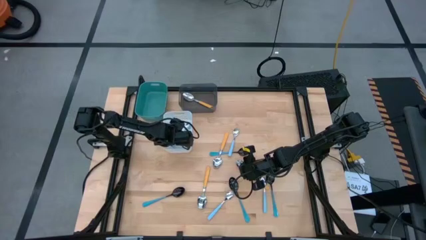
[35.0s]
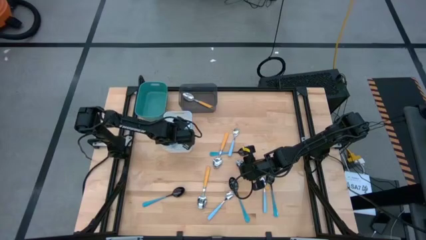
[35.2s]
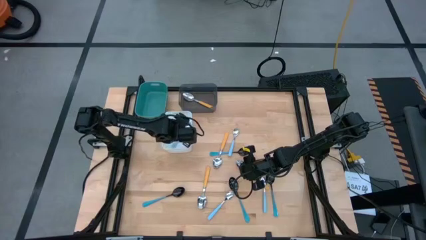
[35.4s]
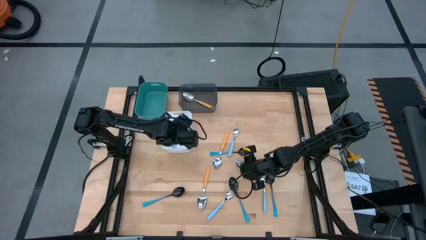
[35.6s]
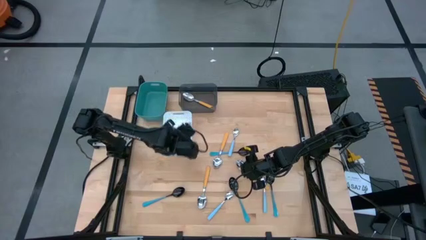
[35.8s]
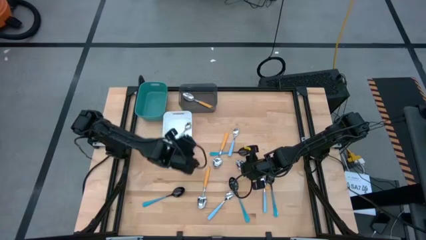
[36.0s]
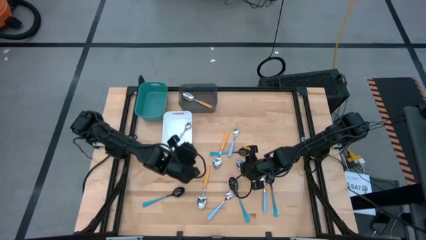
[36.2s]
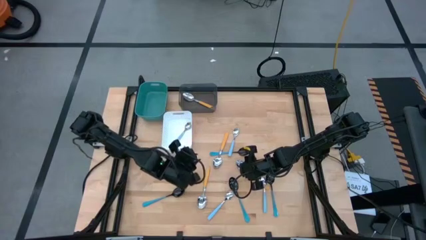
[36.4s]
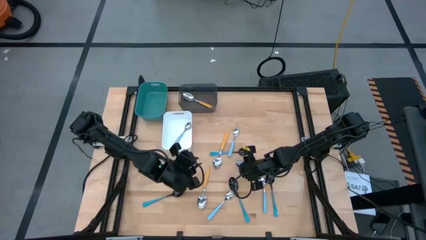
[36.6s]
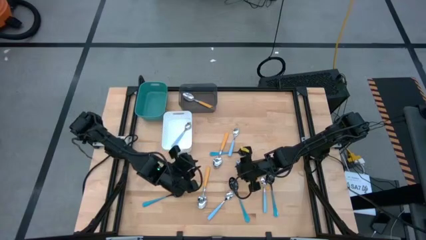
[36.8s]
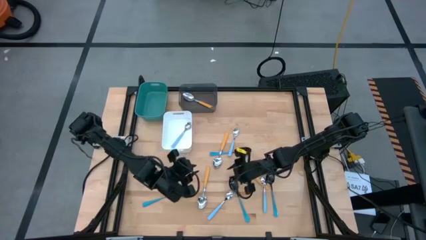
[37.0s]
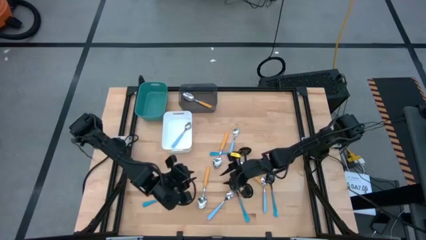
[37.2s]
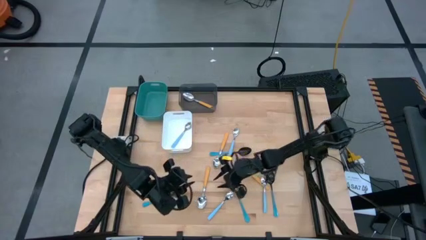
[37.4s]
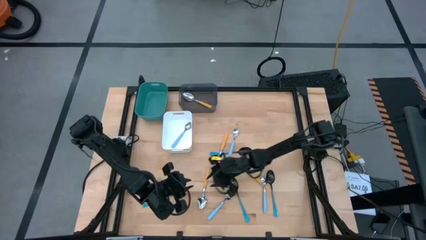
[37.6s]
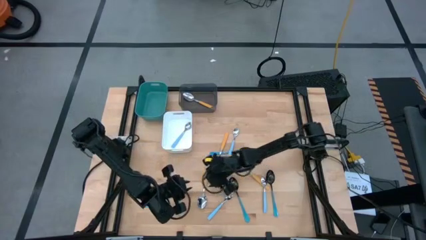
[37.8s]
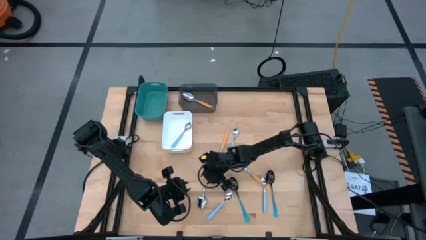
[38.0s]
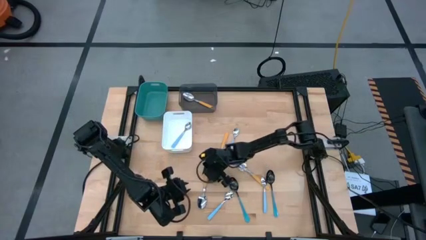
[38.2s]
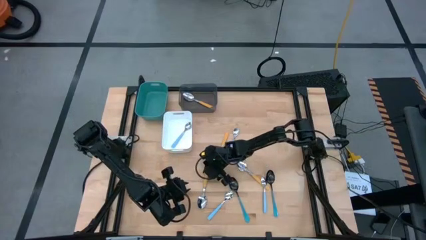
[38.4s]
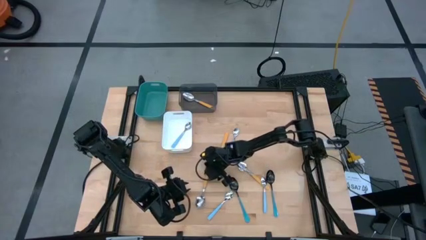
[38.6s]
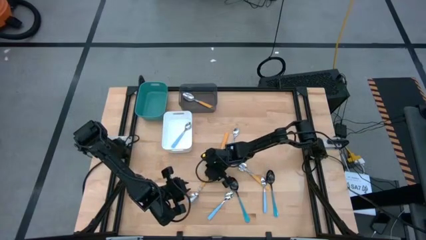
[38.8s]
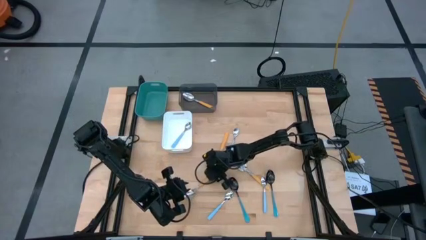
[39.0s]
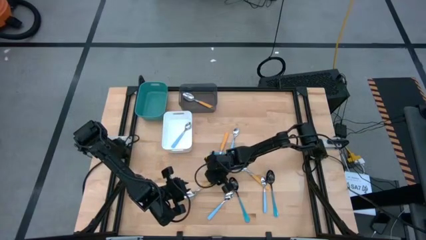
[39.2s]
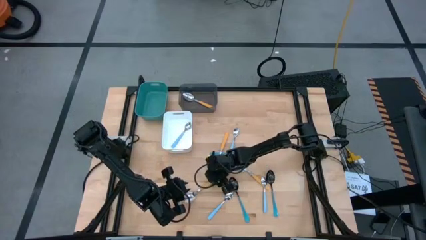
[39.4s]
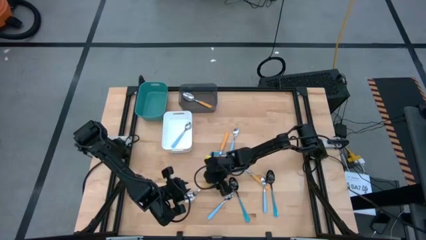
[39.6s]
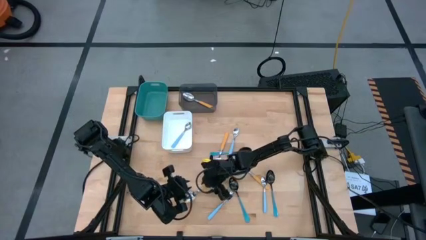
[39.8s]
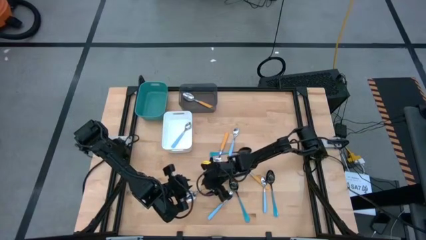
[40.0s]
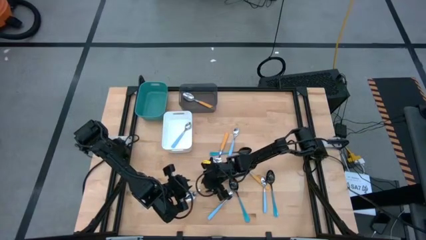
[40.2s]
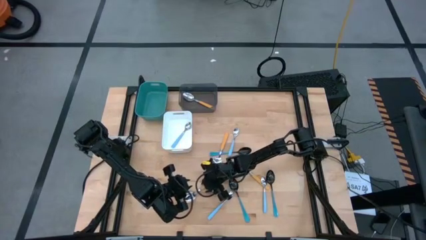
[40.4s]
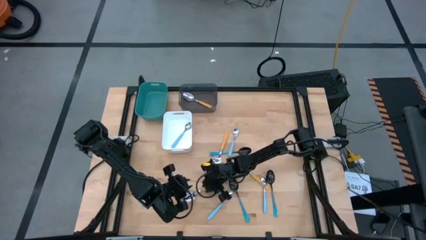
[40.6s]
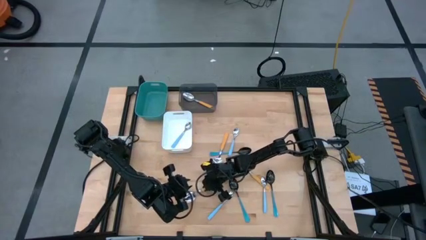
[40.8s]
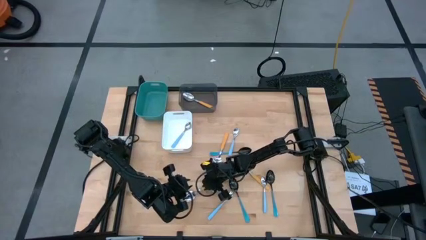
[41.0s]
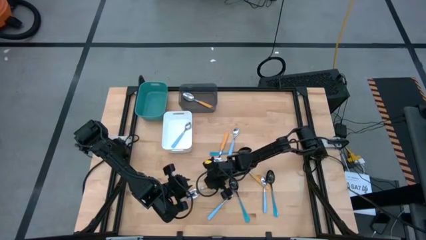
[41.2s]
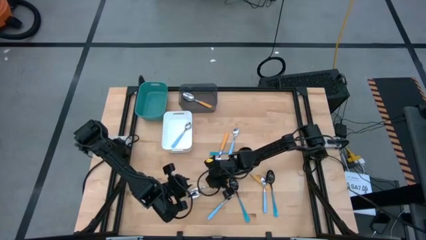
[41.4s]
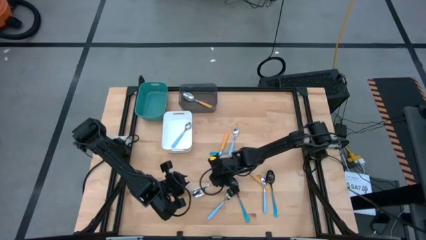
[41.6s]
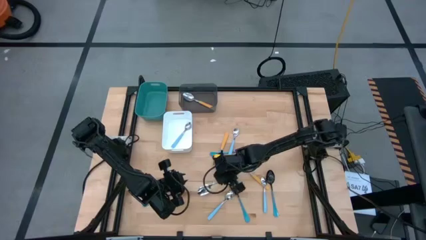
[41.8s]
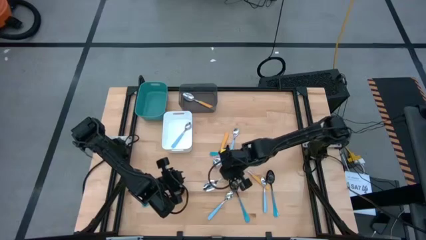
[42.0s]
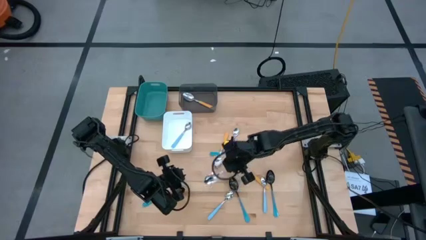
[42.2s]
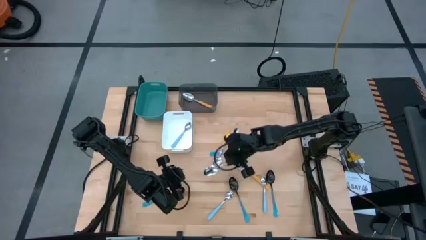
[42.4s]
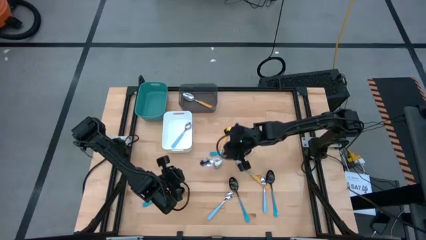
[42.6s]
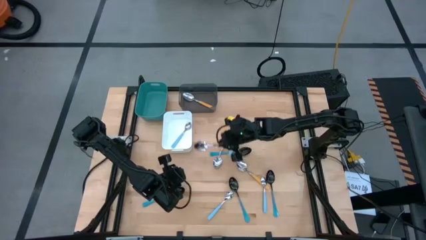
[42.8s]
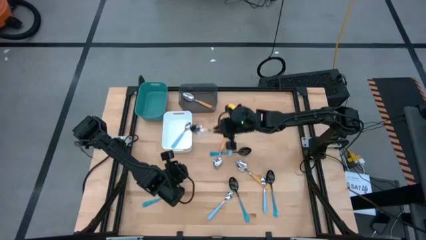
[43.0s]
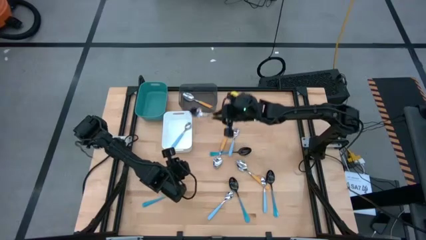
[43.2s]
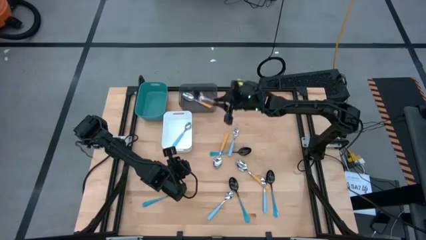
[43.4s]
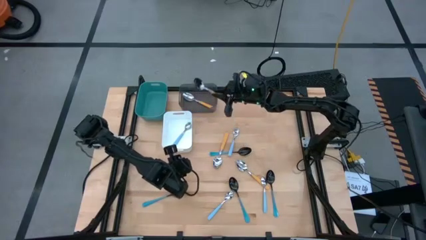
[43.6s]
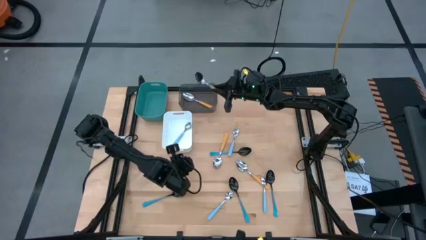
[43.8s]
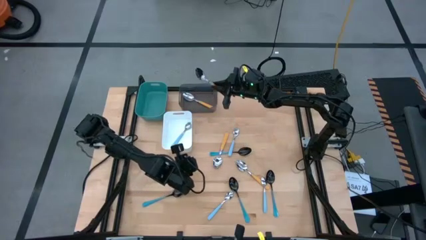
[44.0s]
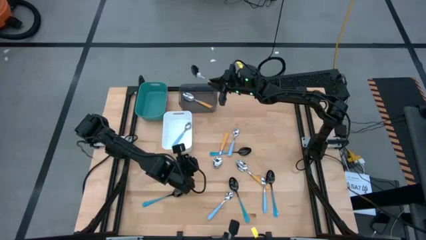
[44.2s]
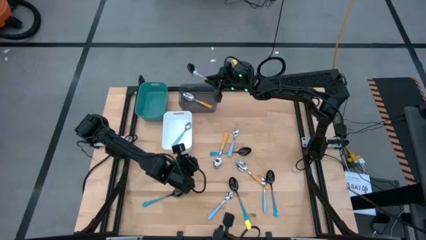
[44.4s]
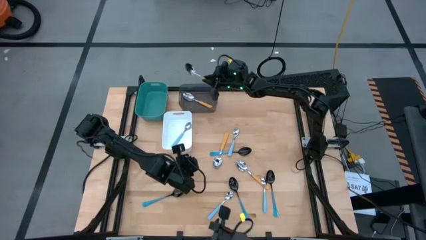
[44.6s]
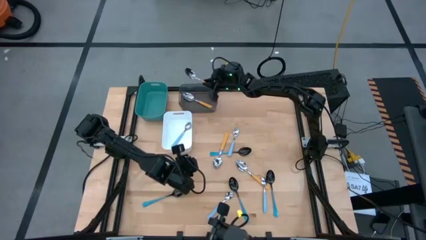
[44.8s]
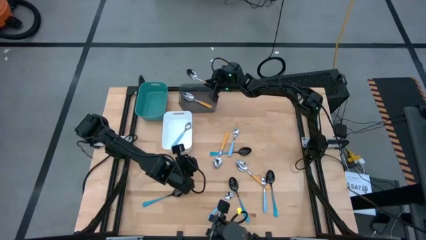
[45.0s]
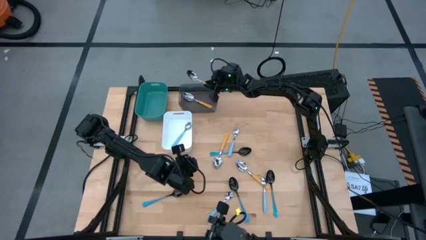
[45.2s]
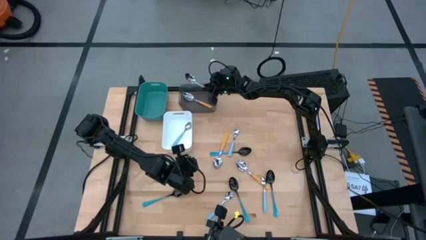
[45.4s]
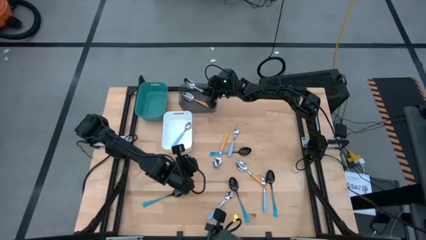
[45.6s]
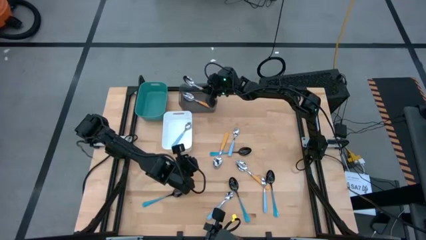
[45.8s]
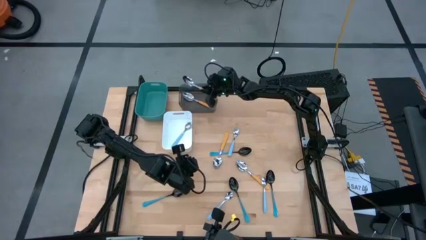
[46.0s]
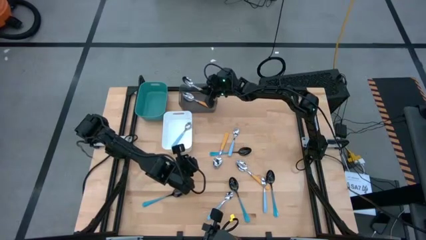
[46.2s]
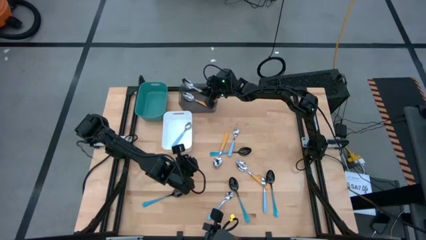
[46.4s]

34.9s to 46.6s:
Task: Sort silverware by color (type)
Put the bottom left orange spoon into the black bin

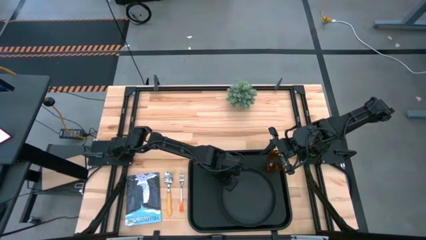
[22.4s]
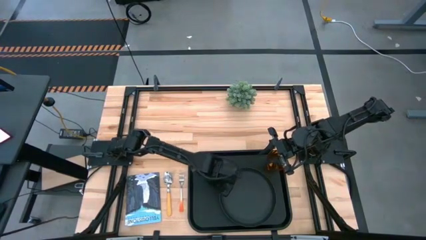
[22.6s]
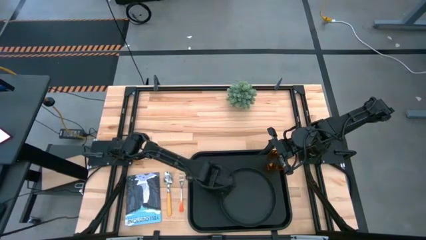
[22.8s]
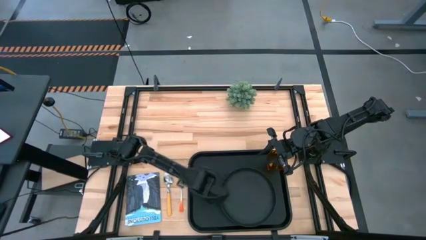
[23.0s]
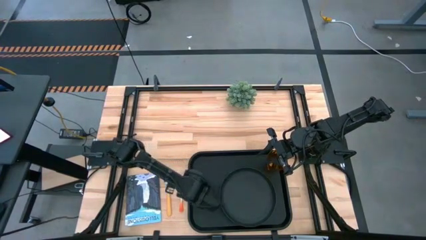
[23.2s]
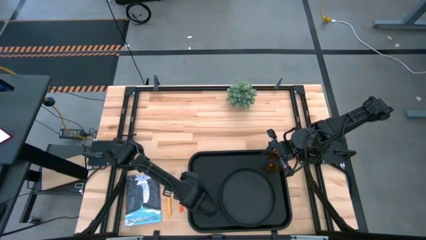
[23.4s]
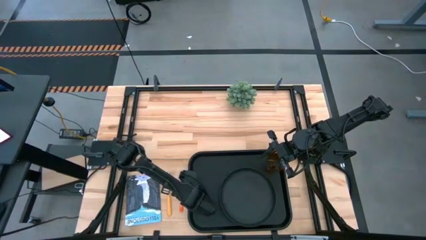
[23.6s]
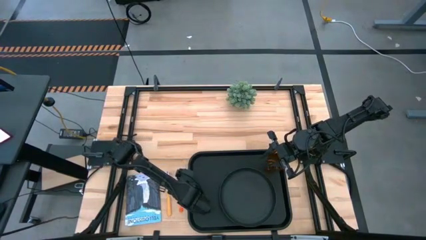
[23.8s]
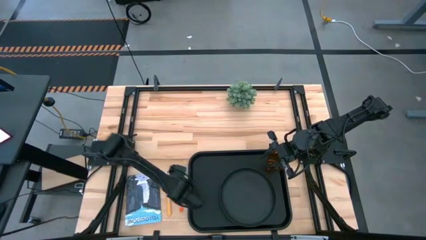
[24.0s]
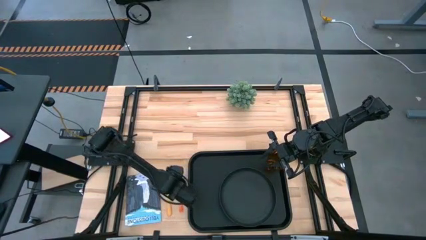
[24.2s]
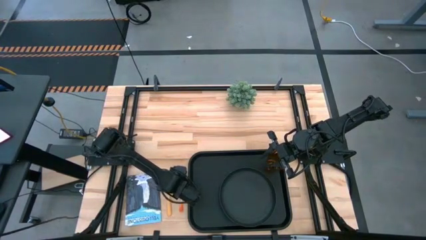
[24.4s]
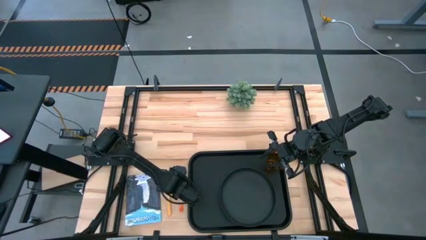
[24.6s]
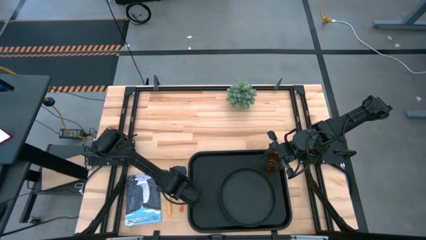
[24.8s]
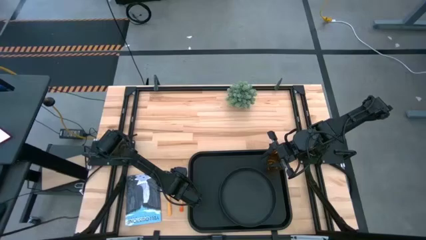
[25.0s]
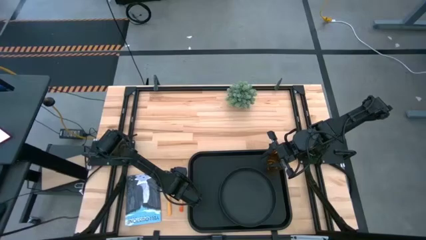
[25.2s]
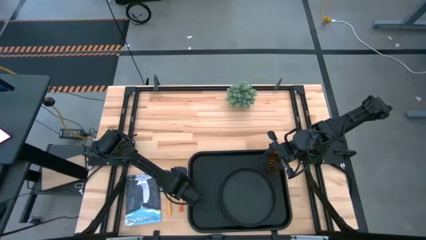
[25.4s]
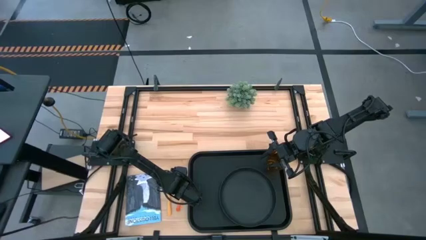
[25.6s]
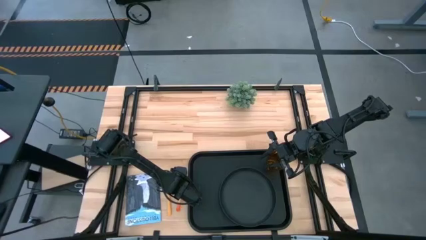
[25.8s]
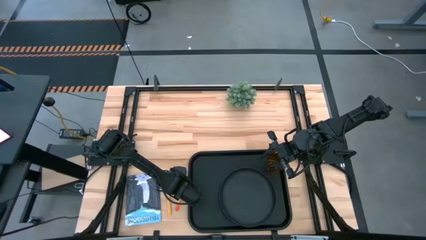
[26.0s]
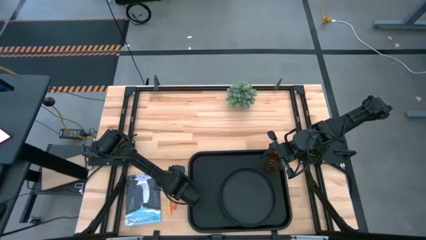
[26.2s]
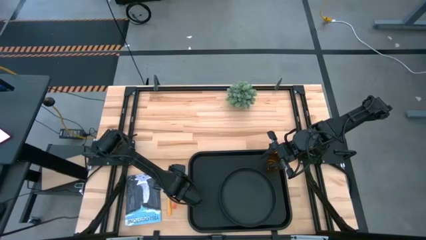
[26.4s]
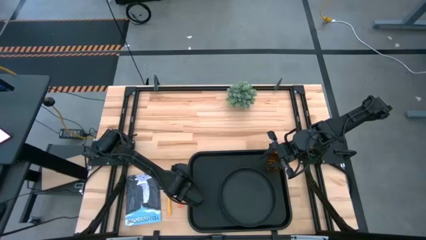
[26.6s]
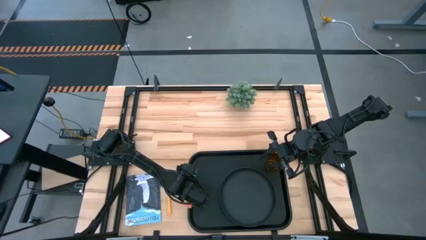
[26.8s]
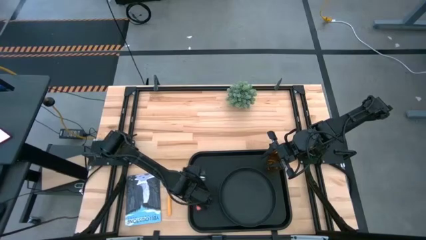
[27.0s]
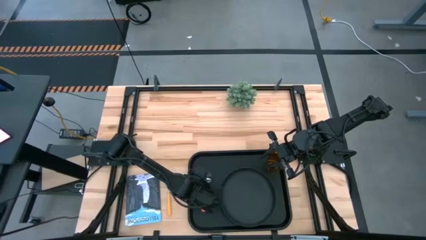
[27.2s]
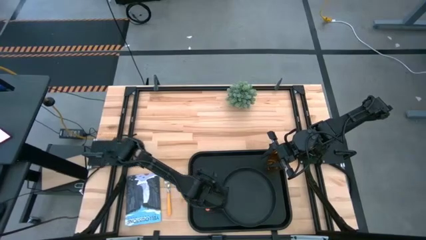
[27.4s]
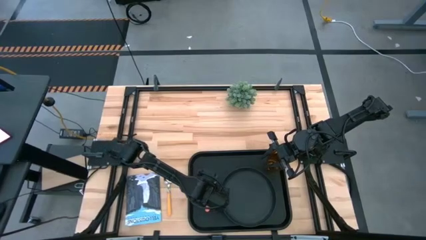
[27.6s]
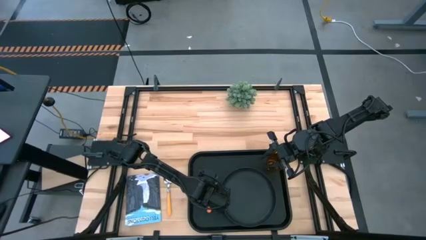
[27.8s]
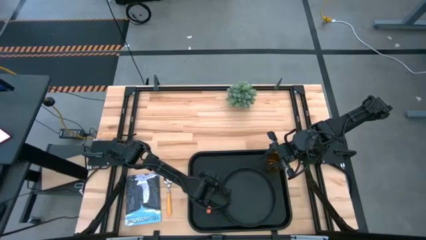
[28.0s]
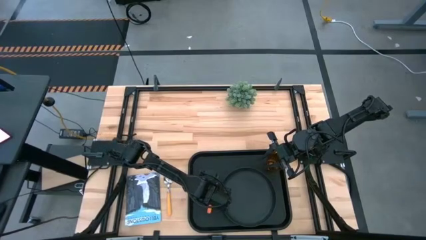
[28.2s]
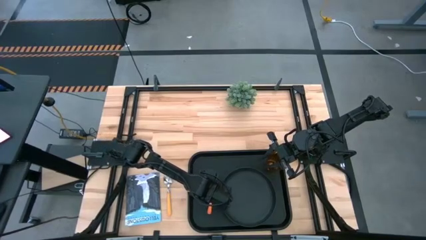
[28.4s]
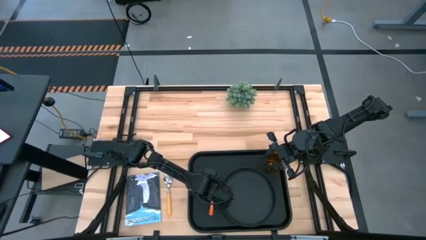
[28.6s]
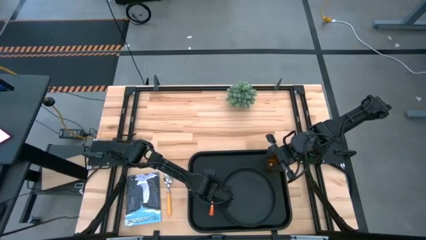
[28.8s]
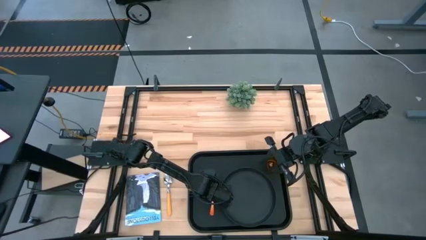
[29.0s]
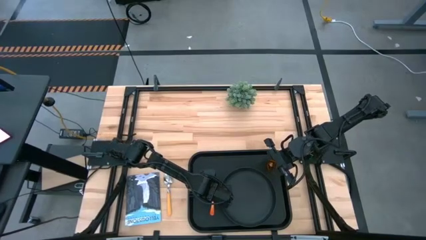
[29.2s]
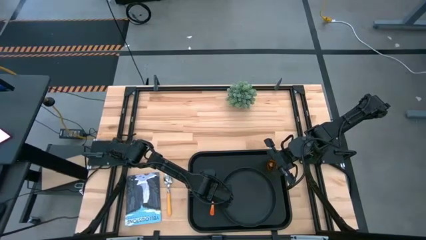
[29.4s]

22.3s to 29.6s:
Task: Pick and place plate/cup/fork/spoon on tray
Put the orange fork on the black tray to the left of the black plate
